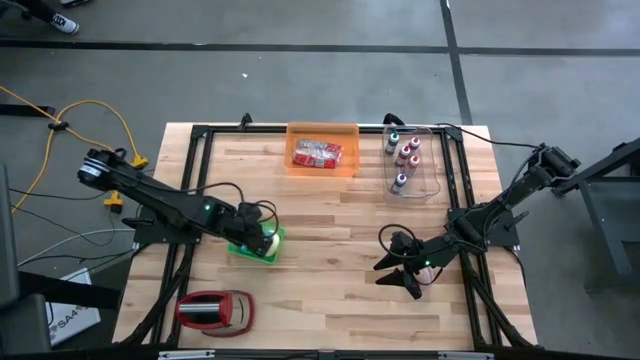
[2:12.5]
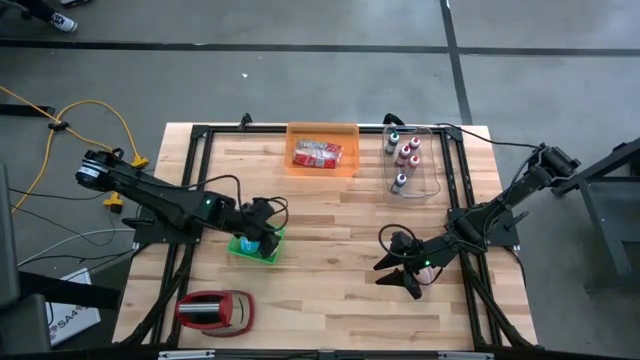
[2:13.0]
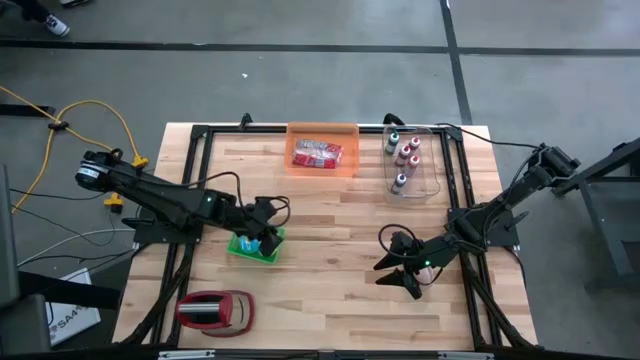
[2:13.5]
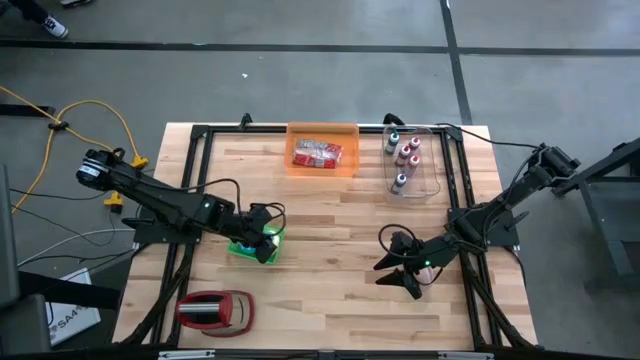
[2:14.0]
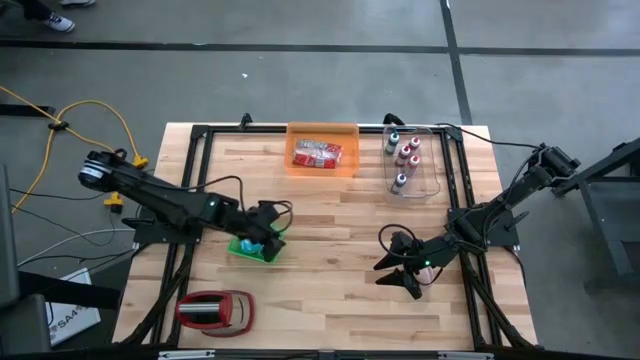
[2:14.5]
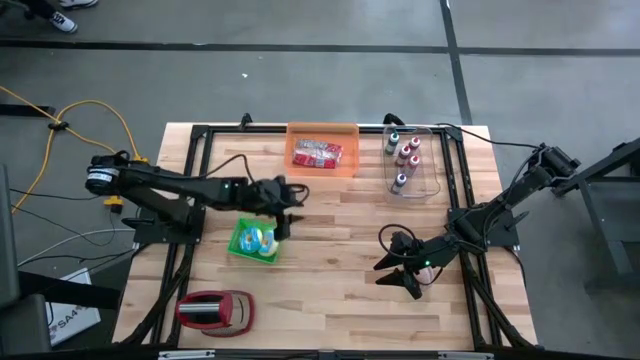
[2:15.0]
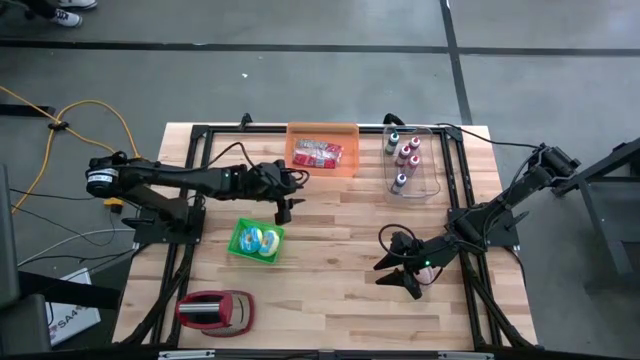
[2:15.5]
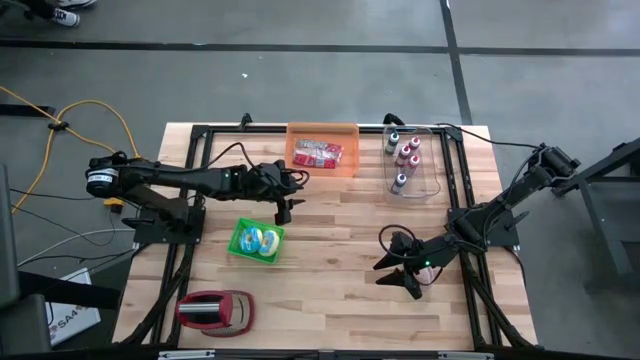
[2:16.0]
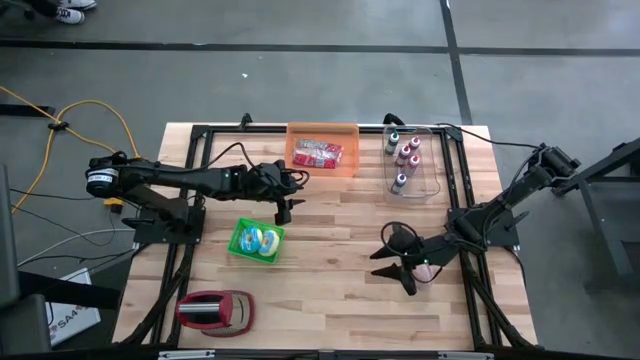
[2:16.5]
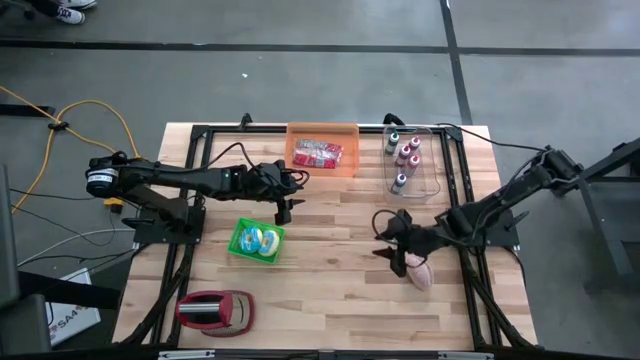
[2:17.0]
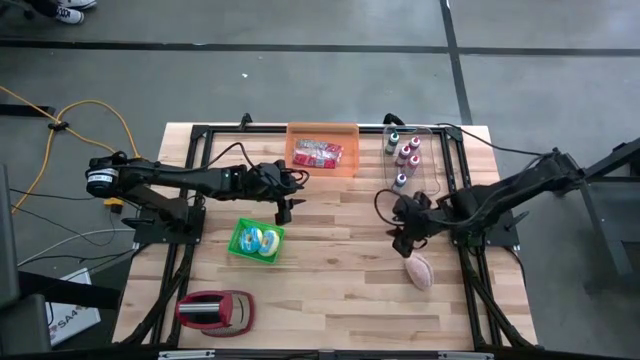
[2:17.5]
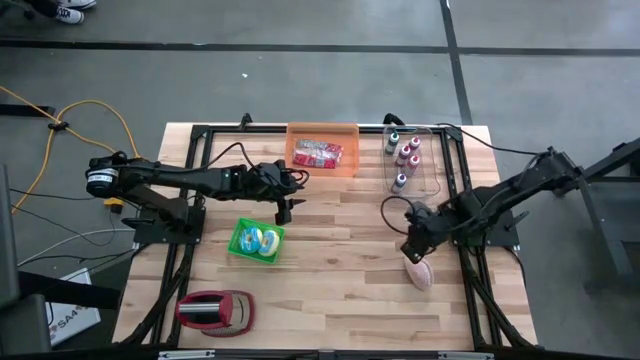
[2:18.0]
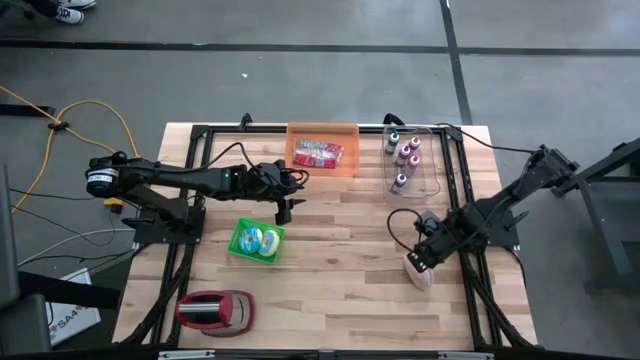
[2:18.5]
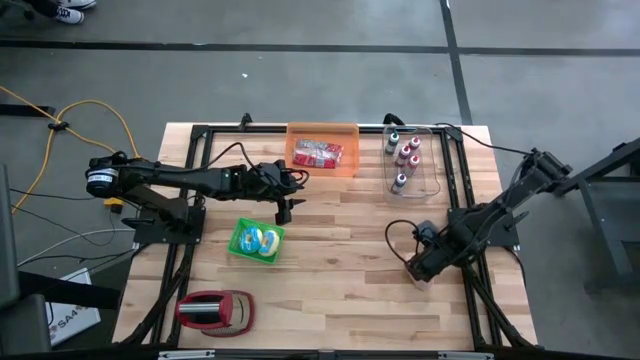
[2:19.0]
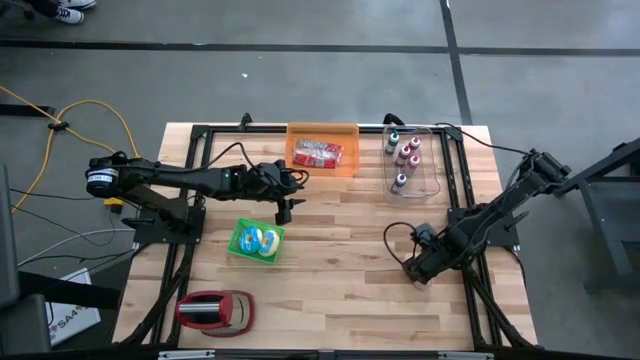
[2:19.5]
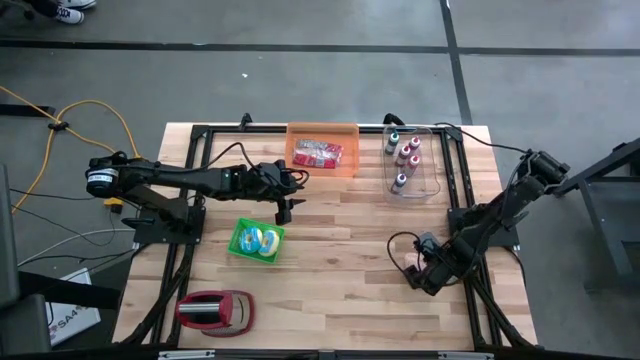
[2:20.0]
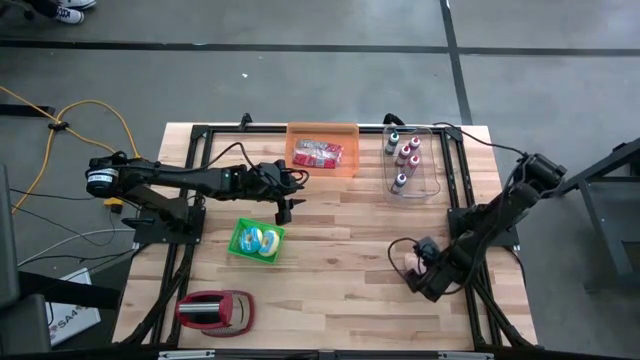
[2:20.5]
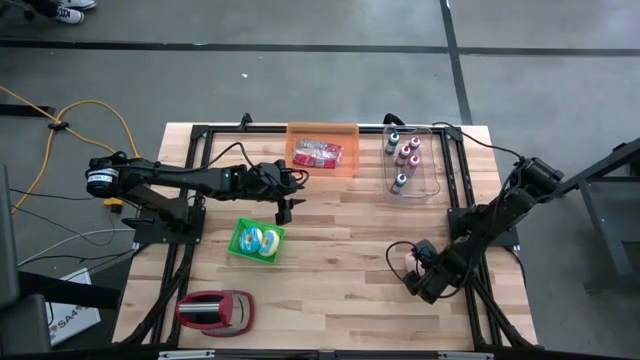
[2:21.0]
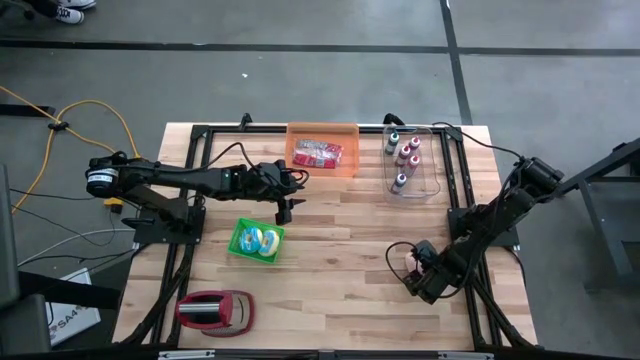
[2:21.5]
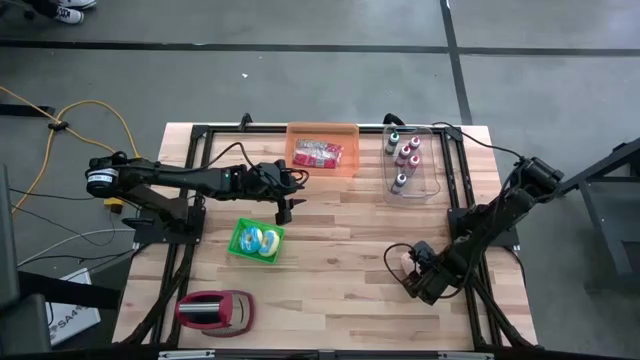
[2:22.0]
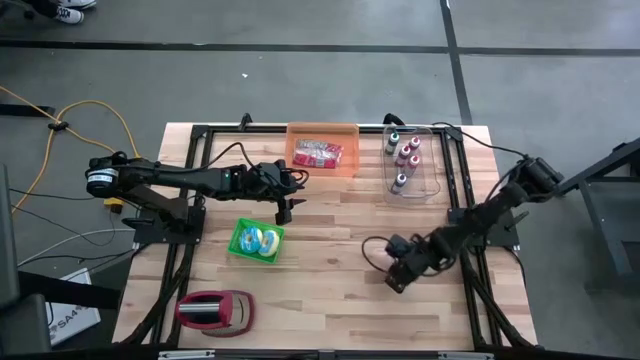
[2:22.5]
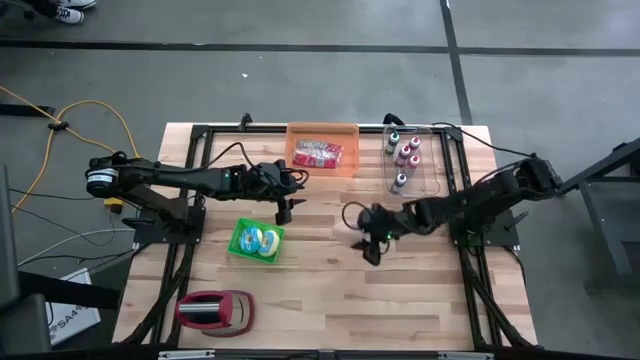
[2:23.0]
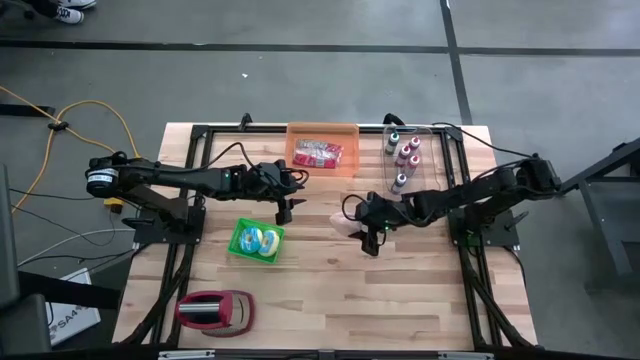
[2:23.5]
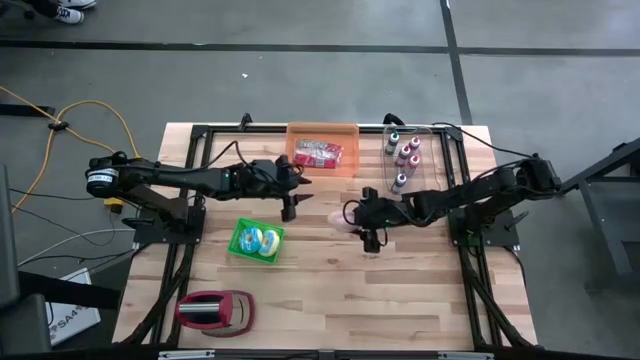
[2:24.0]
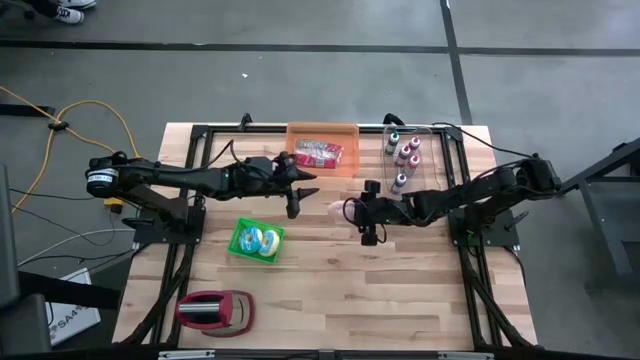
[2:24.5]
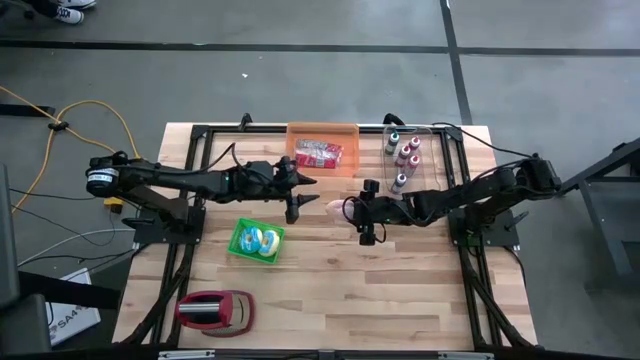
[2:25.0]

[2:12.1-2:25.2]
Put the brown donut into the green bin
